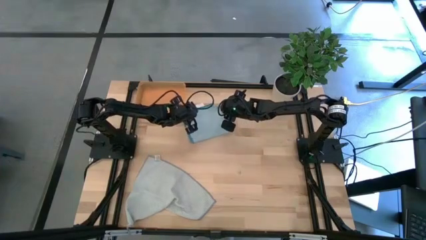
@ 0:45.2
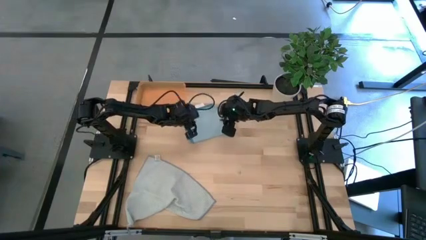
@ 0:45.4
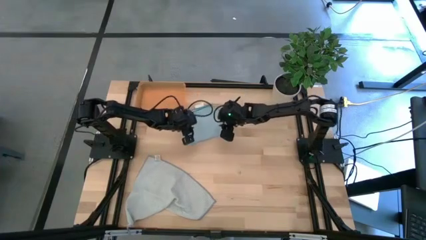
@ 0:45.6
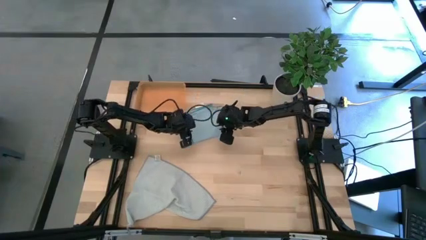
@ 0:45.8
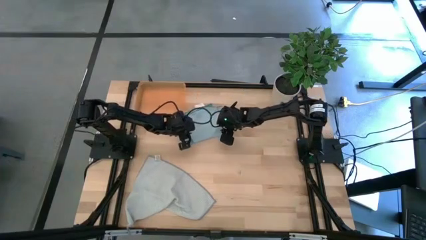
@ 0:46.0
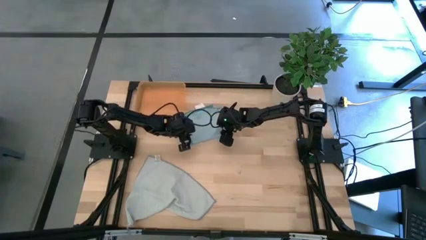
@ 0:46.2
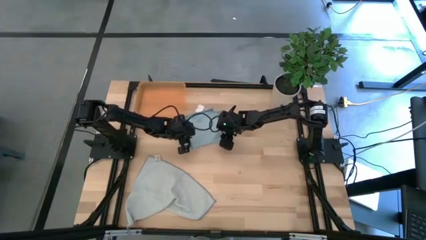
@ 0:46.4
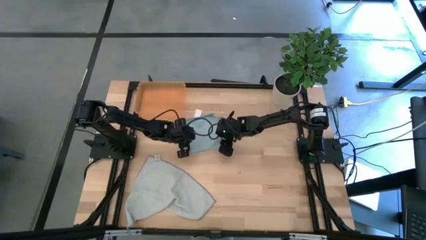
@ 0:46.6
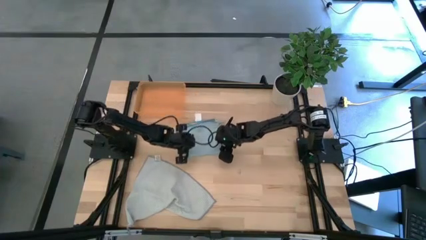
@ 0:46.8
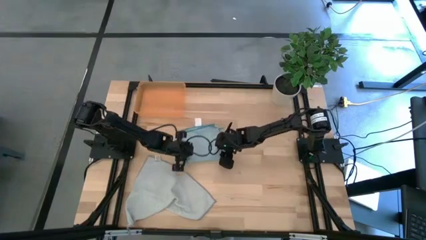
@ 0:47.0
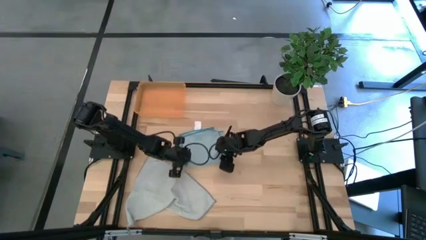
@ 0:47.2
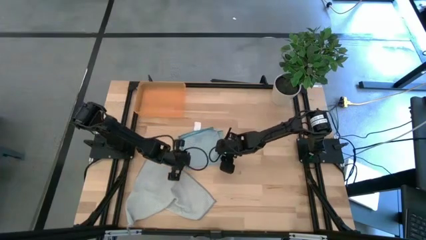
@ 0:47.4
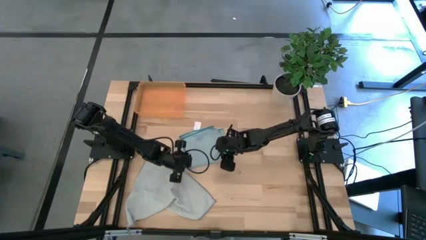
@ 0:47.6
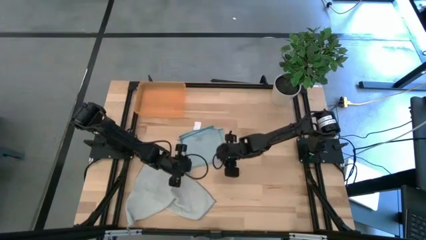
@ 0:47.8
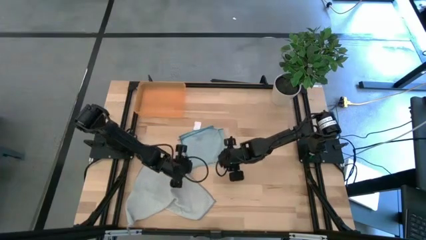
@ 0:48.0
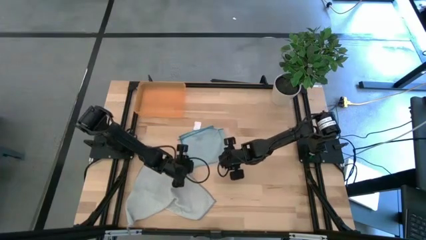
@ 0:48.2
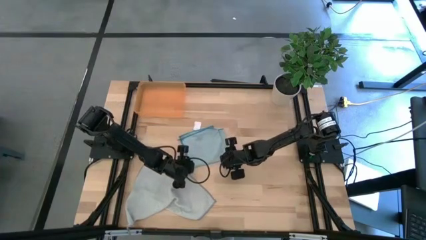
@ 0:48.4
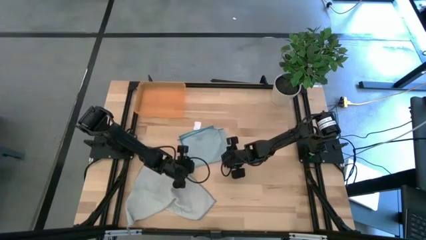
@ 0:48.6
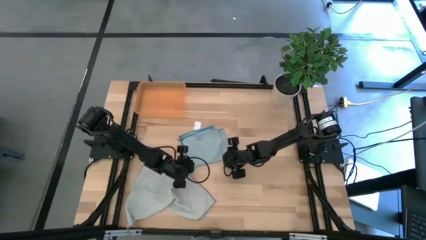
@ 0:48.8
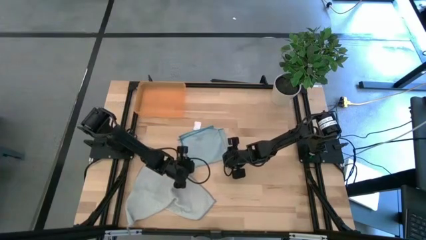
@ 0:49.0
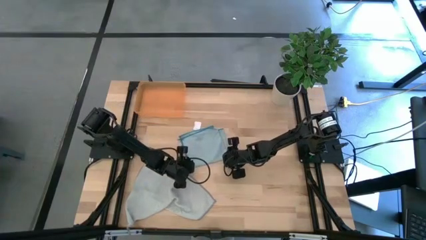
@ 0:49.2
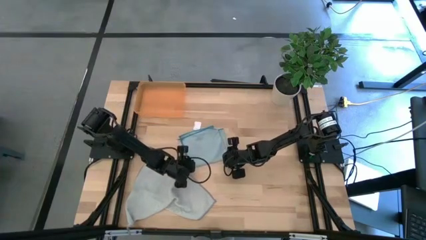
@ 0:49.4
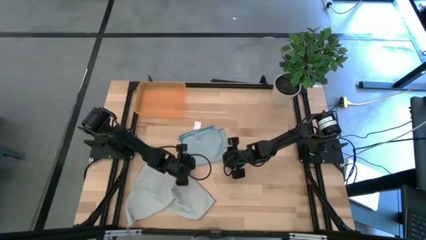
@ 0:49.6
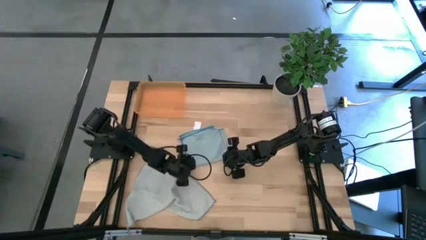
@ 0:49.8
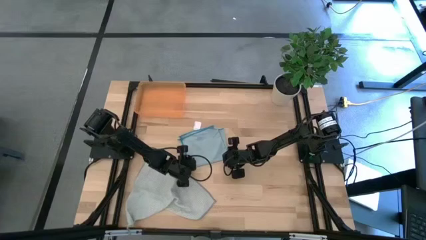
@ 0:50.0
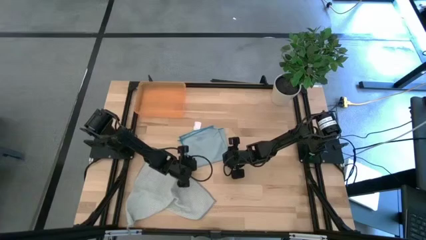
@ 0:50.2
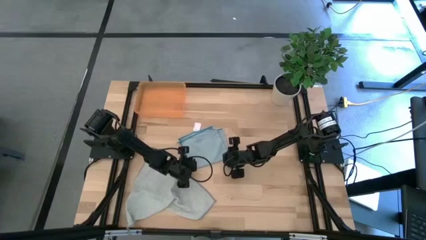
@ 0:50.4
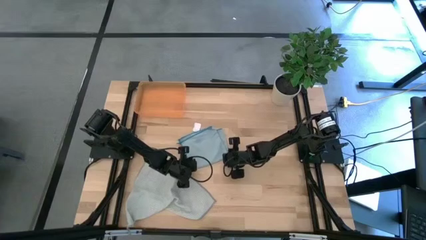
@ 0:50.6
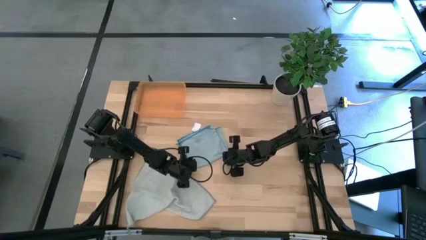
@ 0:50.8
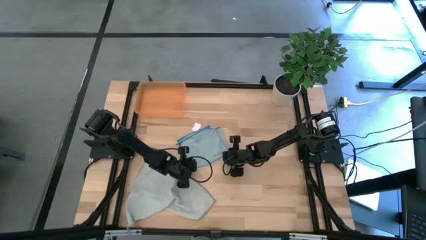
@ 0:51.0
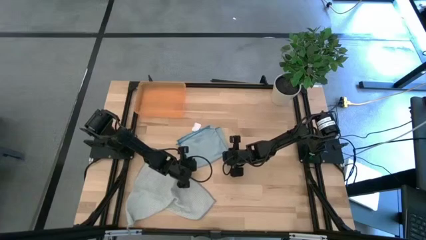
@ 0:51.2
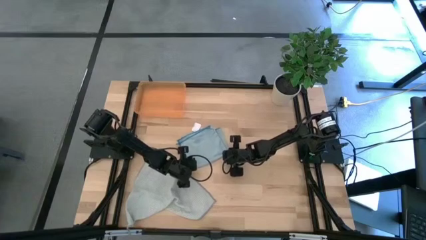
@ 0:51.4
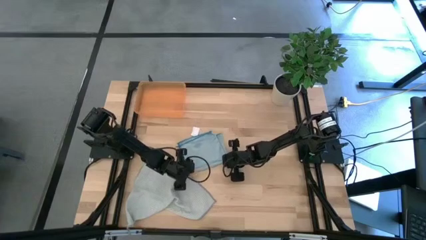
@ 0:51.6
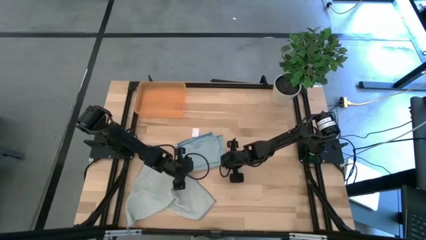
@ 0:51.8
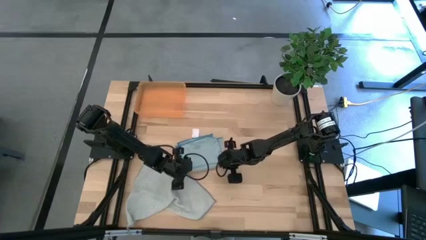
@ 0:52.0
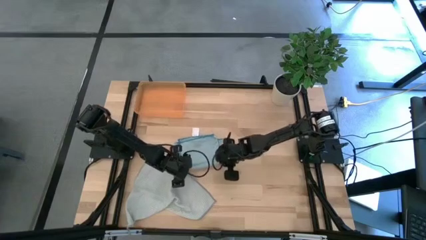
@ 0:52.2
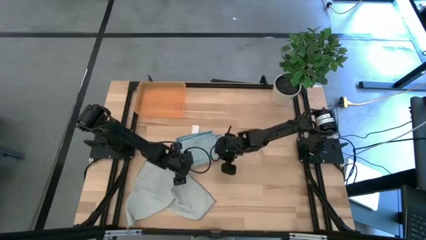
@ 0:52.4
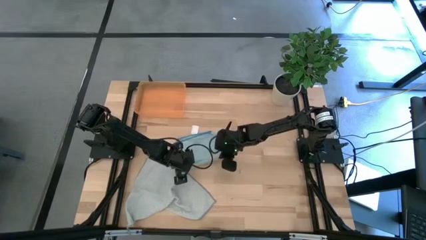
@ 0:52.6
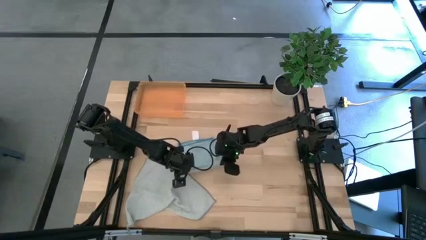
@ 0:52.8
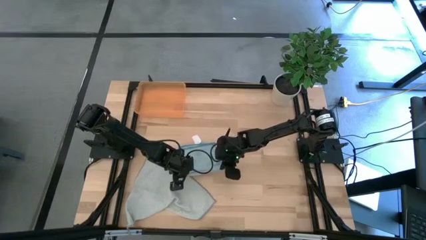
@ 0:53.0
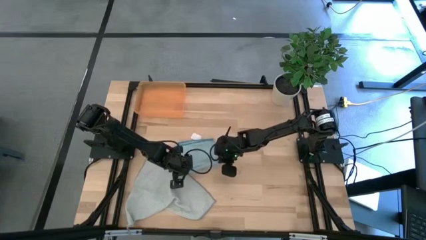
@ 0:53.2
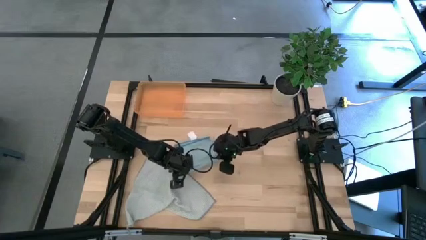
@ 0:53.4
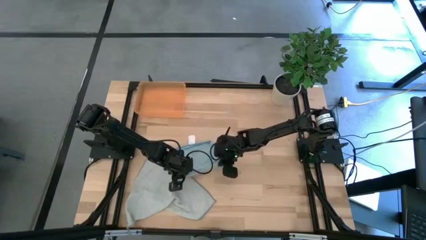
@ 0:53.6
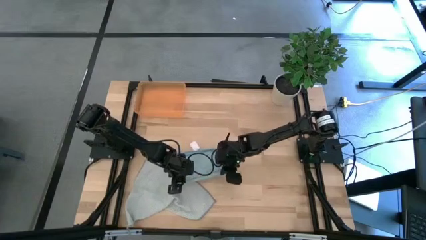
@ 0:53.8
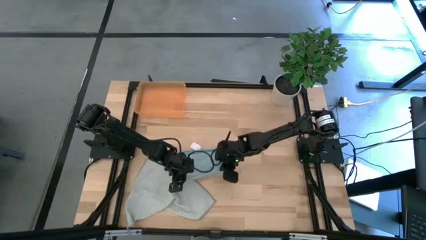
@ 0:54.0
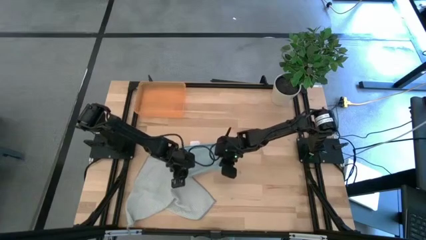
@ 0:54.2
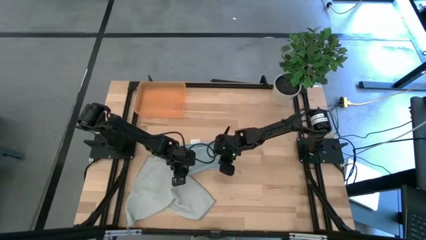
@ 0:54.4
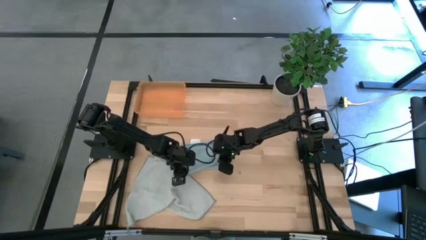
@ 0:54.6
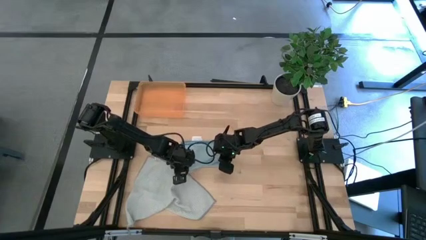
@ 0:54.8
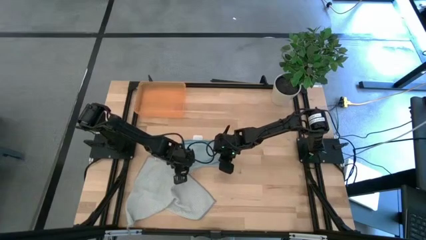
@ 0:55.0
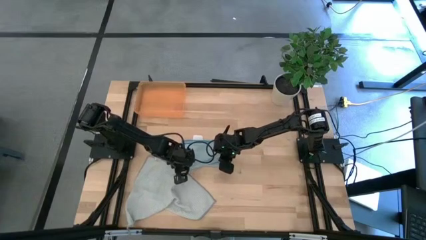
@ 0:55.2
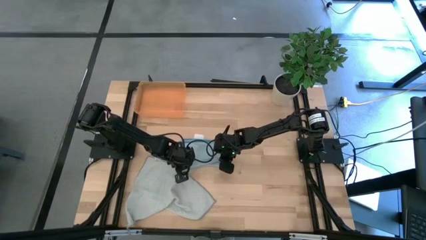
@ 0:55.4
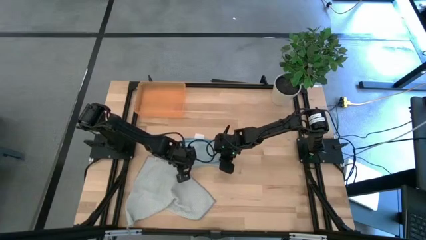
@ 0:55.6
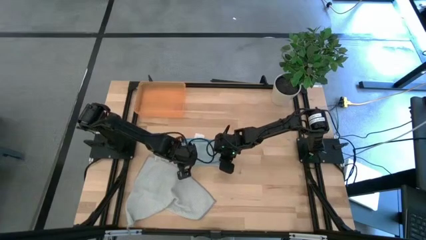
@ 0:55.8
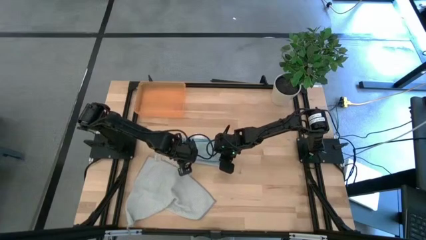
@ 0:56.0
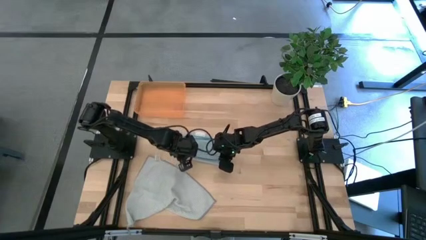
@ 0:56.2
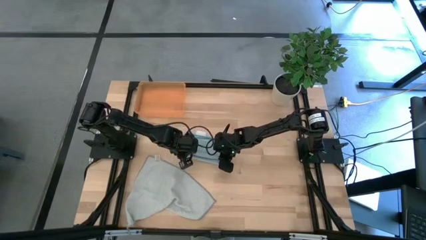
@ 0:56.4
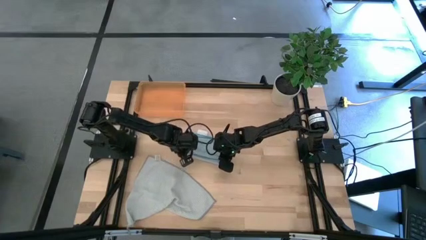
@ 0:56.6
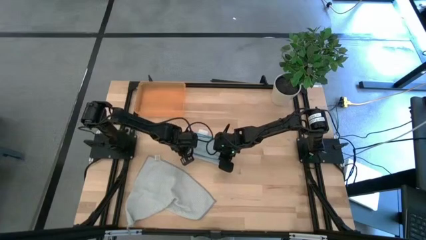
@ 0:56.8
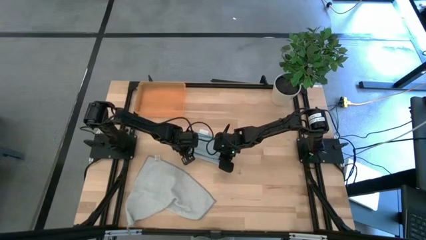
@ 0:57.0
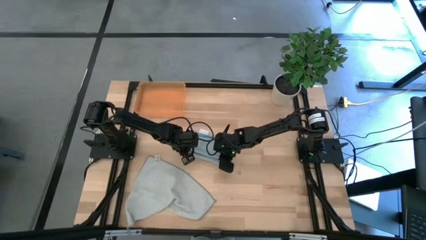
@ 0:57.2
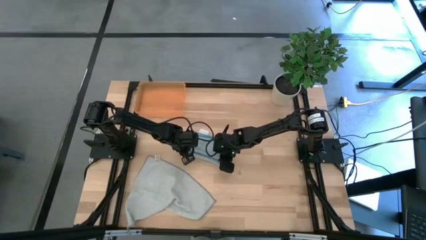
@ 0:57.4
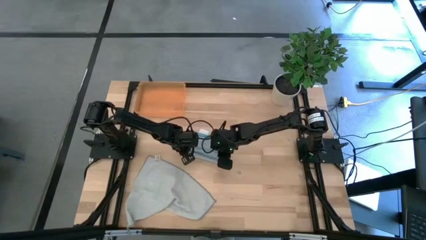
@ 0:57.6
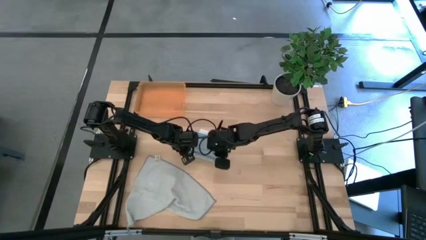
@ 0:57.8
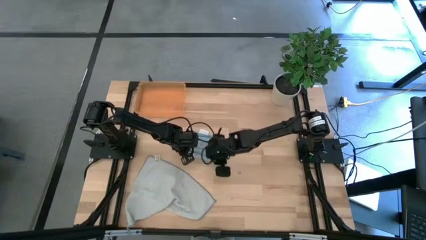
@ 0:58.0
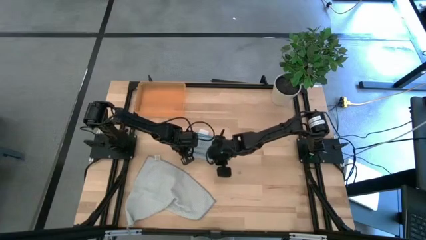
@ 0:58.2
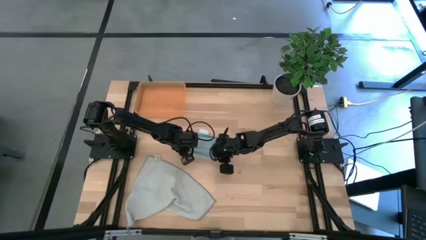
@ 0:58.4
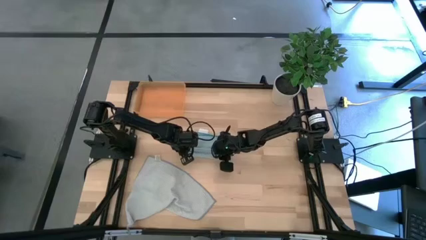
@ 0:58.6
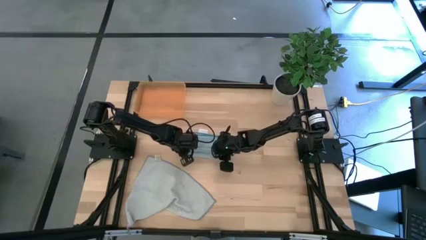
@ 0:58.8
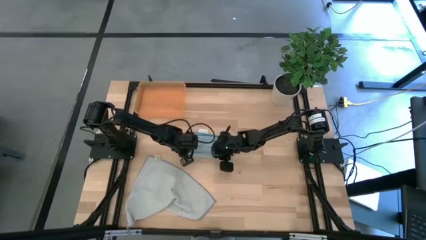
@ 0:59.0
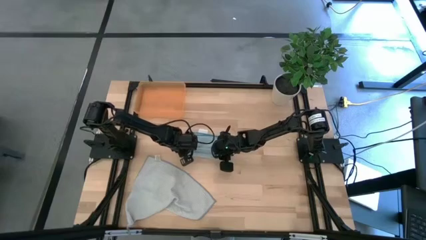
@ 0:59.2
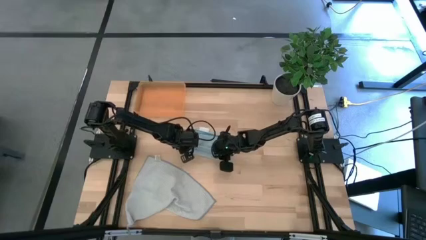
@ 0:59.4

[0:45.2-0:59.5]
Task: Roll microfiber towels into tight, uniform cylinder then place into a basket
Roll the blue microfiber cloth
